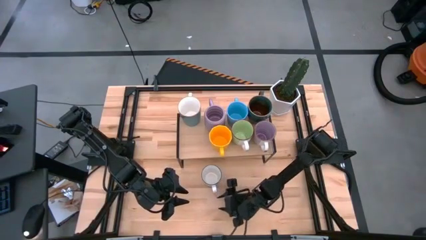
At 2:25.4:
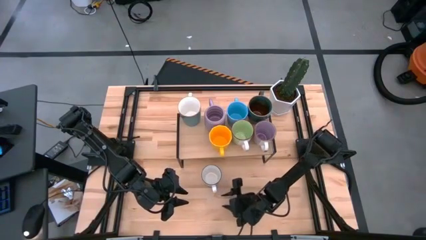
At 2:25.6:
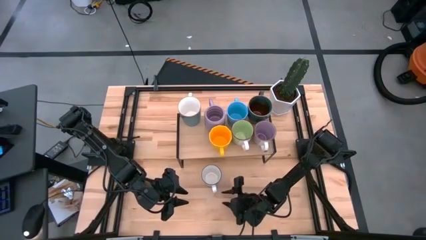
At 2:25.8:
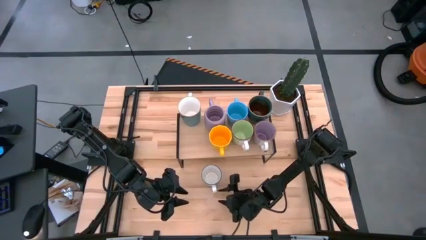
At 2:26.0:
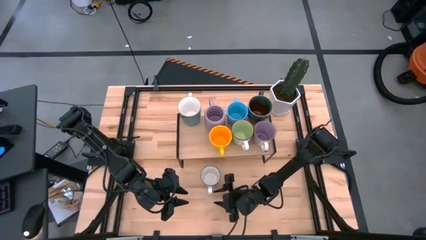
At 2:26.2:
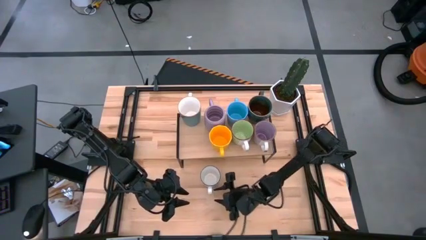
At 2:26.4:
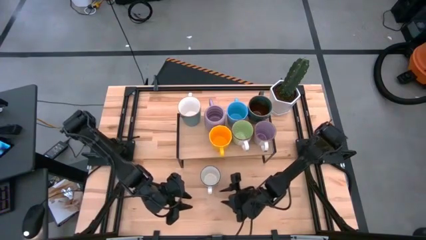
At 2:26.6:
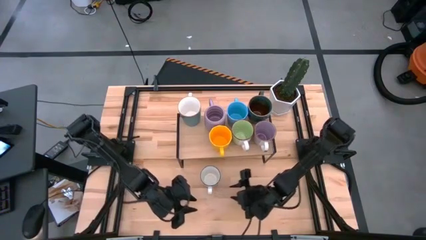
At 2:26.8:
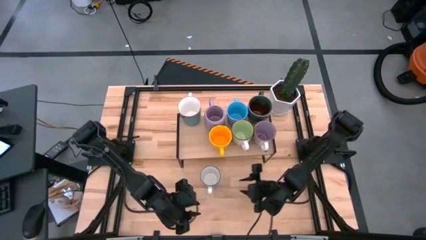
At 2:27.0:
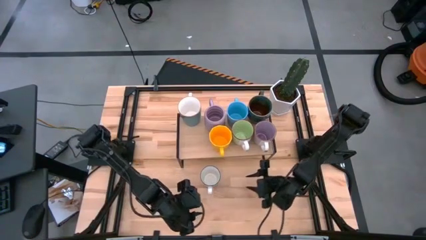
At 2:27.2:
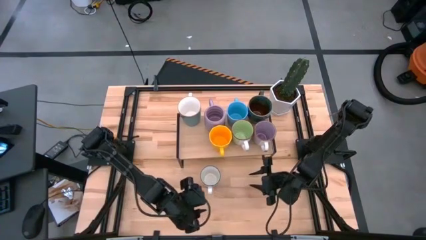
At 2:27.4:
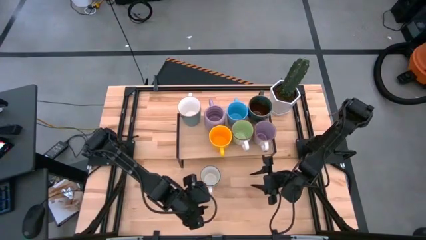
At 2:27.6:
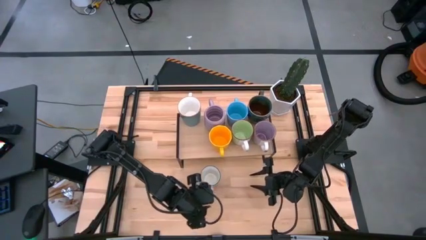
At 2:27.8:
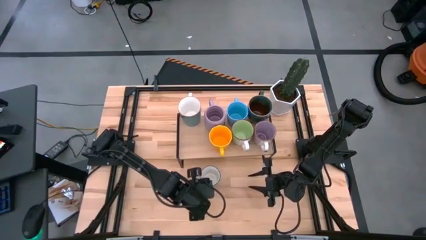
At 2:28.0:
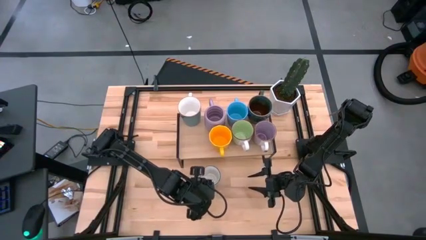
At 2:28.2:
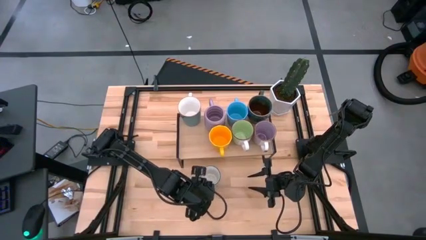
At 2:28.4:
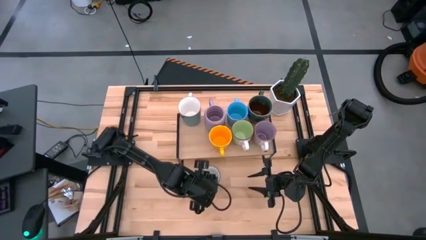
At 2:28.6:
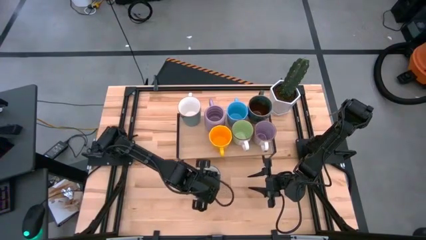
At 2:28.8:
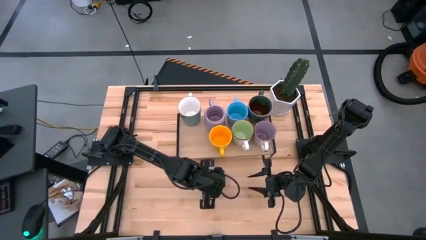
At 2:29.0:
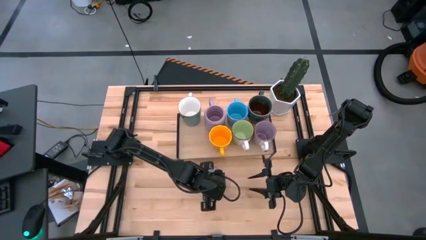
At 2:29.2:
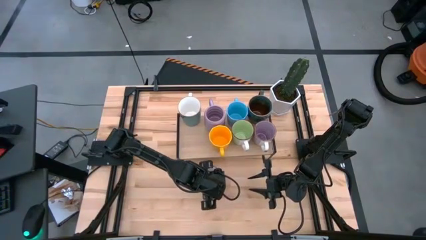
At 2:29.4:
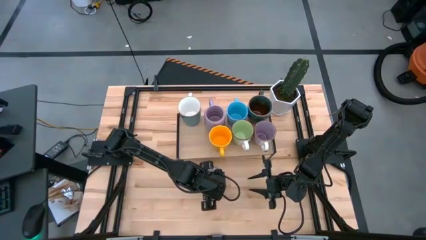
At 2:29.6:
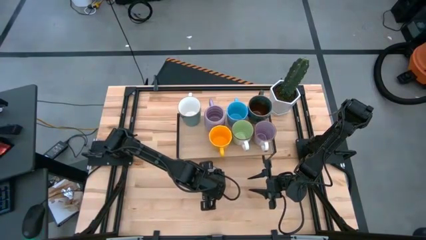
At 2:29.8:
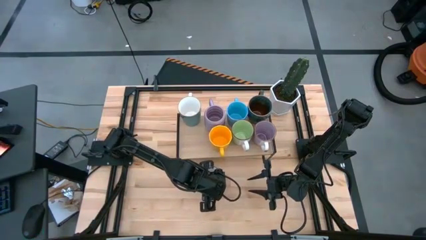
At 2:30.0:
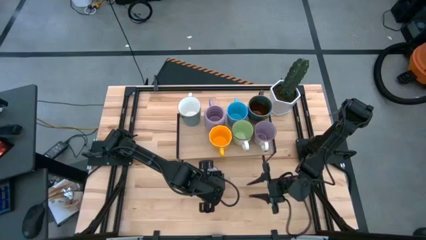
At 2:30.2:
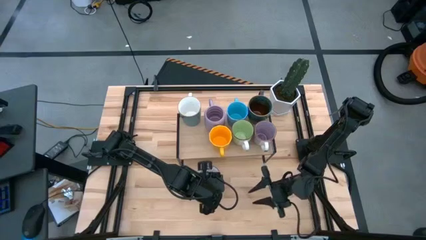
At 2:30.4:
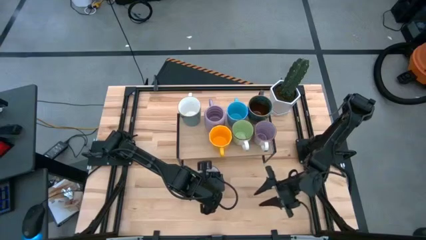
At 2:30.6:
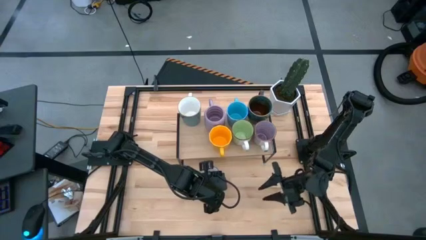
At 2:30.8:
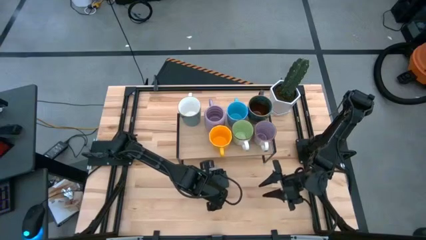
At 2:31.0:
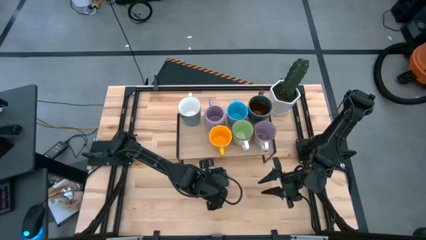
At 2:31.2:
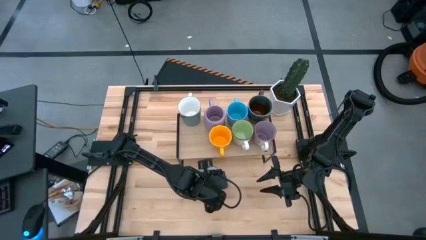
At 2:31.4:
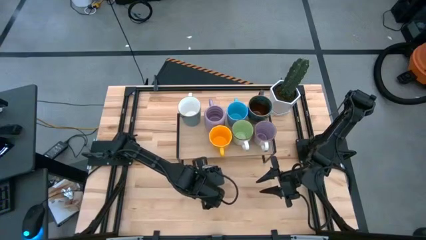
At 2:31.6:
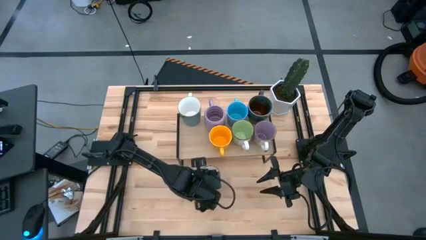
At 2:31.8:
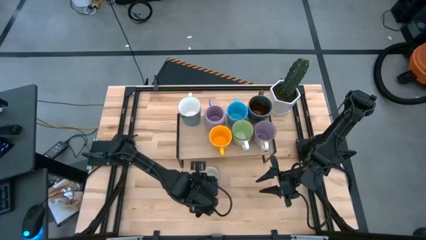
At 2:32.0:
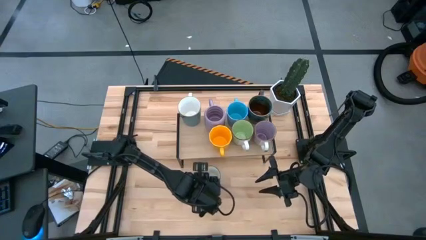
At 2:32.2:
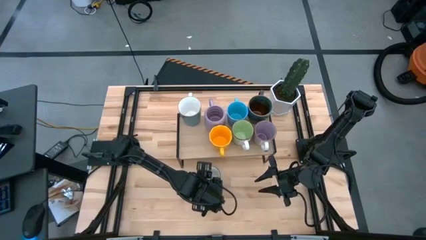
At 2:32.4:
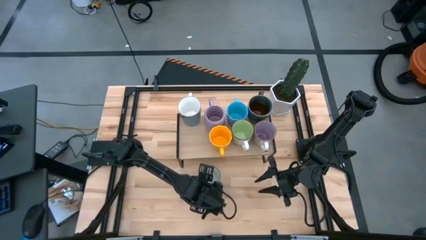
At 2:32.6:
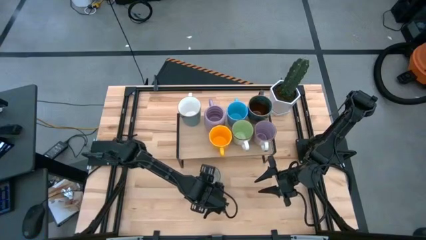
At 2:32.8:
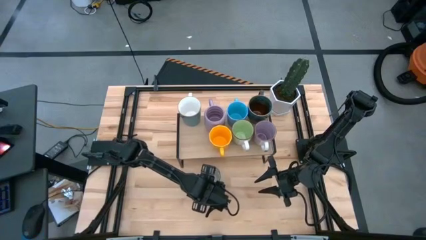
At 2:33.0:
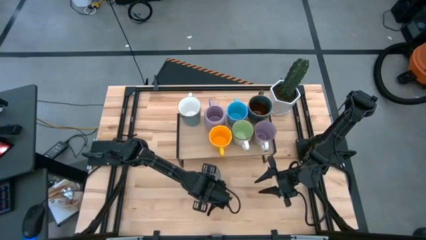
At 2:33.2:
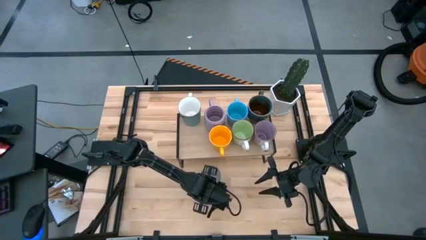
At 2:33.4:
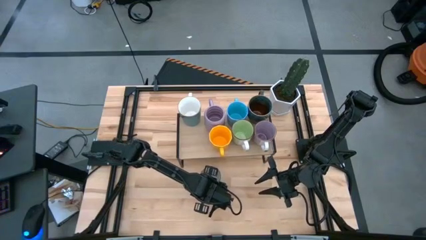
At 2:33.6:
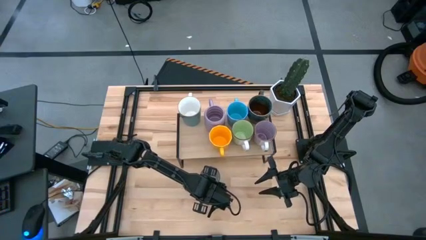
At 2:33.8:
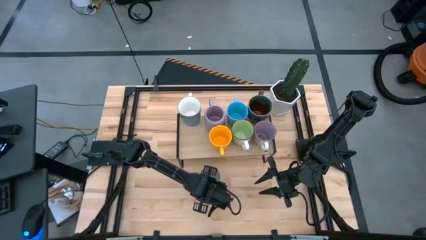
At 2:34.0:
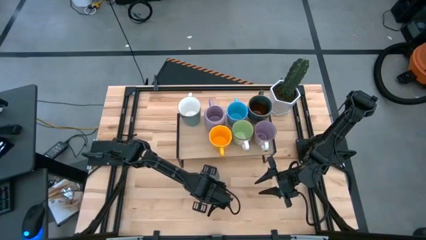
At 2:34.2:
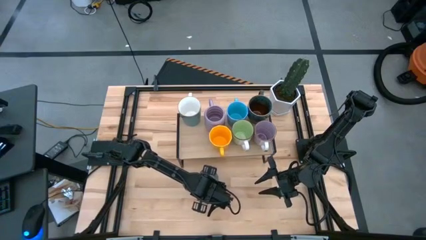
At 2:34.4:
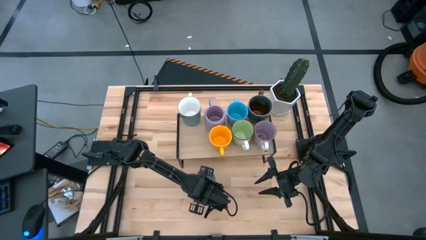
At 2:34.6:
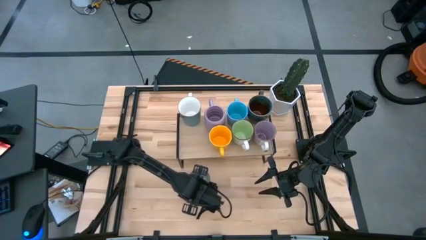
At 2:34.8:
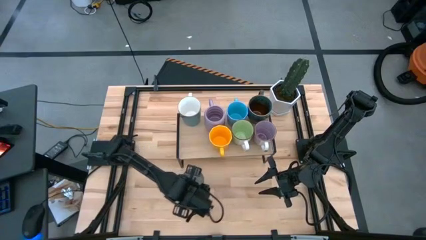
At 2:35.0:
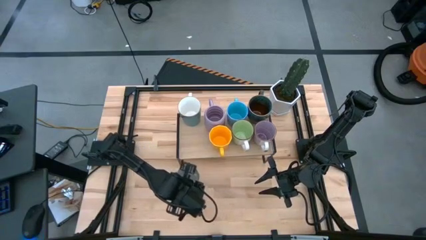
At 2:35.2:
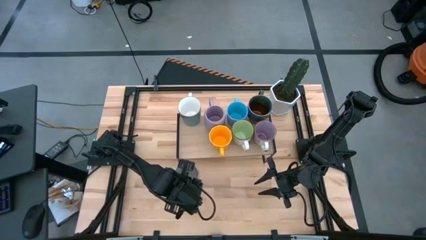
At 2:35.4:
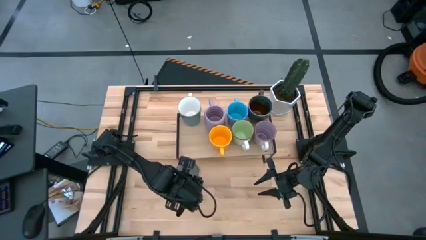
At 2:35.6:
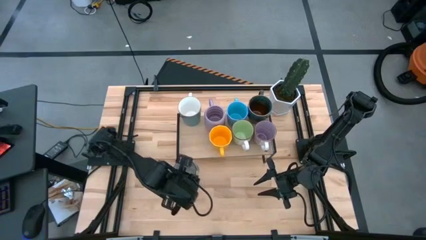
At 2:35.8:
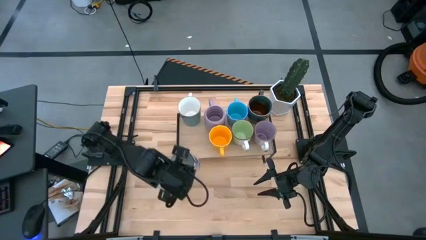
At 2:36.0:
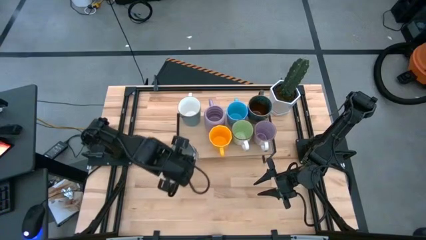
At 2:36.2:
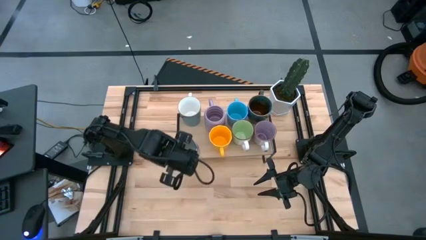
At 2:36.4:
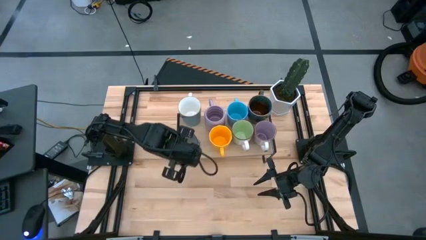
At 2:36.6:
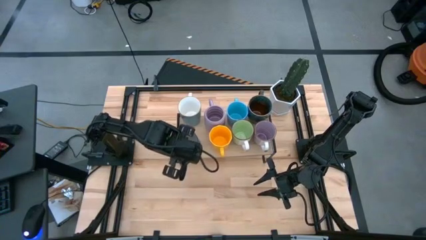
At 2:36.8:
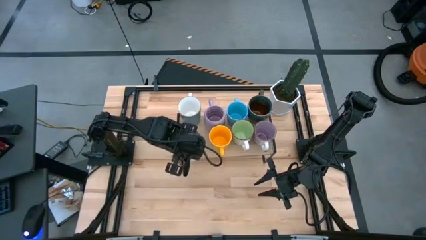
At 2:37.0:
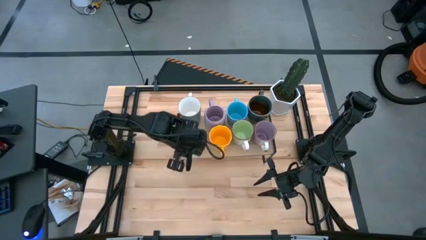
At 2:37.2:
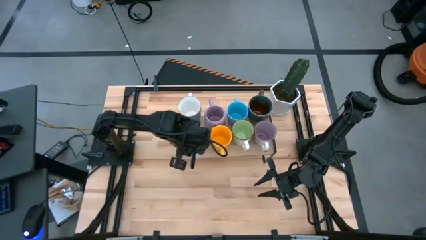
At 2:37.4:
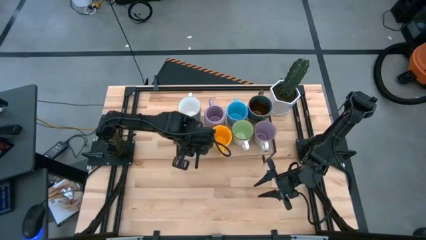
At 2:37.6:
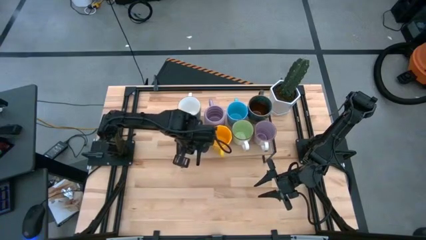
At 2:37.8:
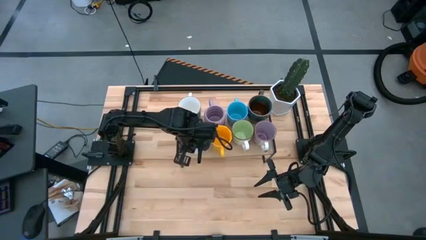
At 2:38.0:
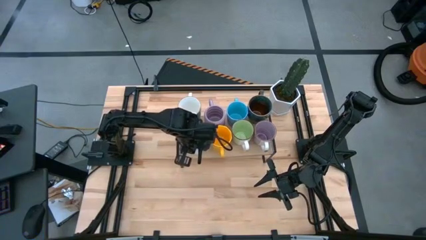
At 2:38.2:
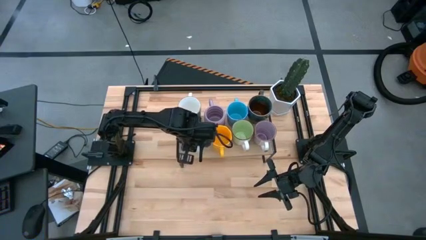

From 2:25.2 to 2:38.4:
Task: Place coffee mugs
Put the white mug on the shelf
